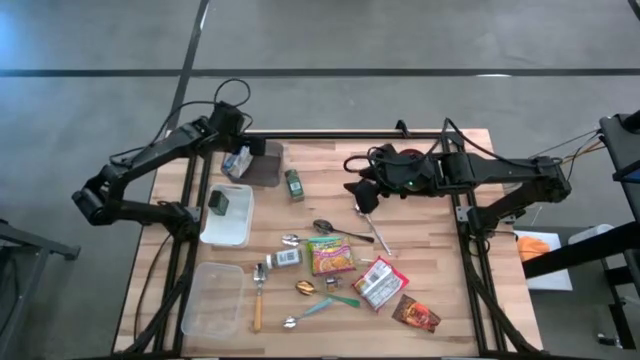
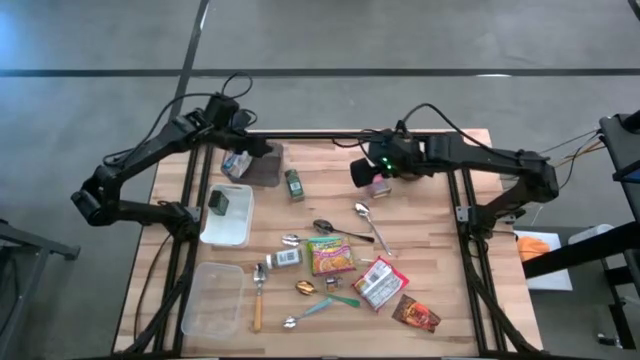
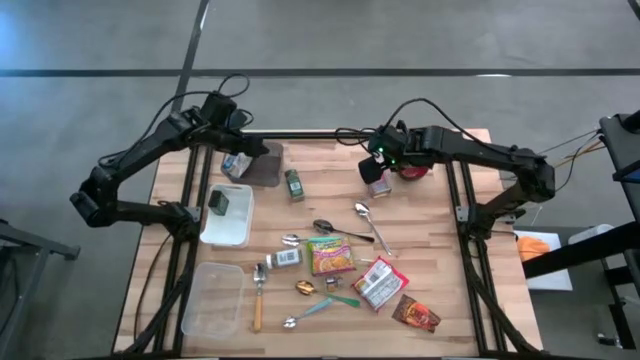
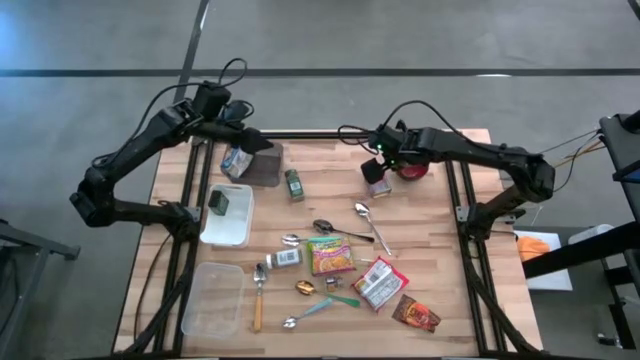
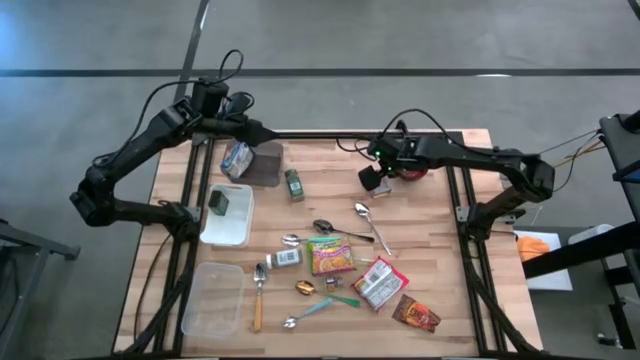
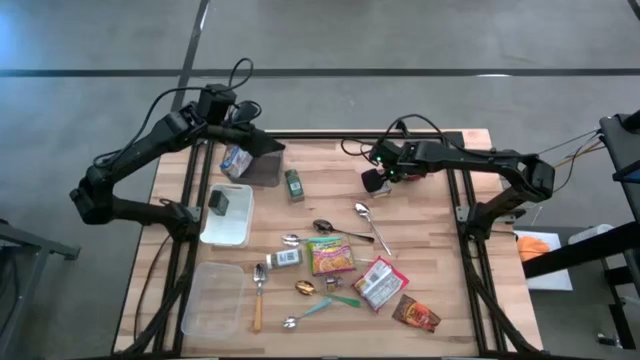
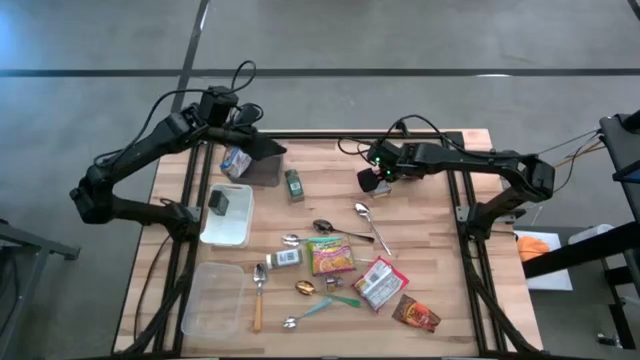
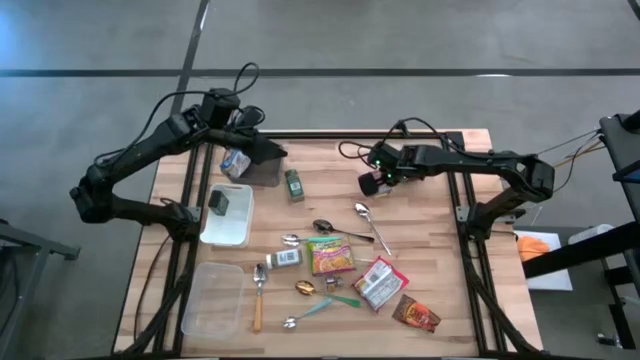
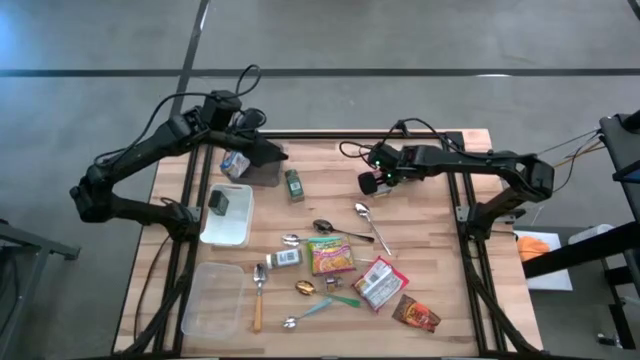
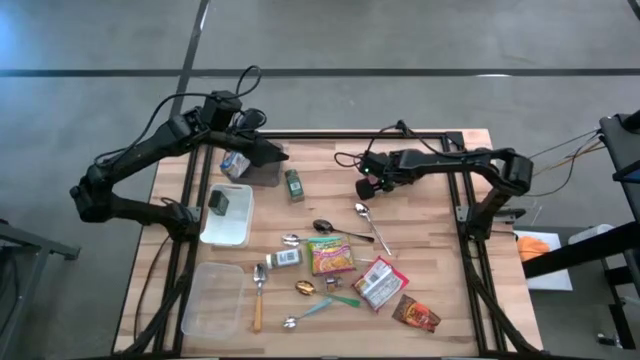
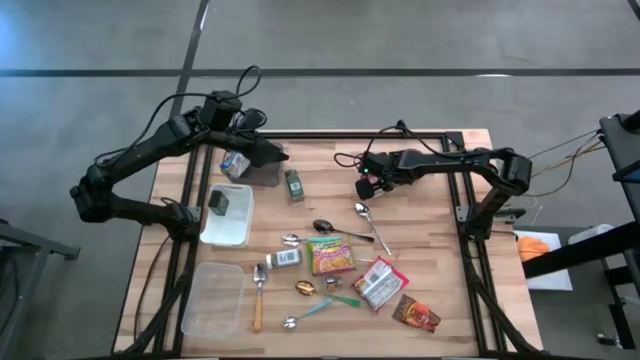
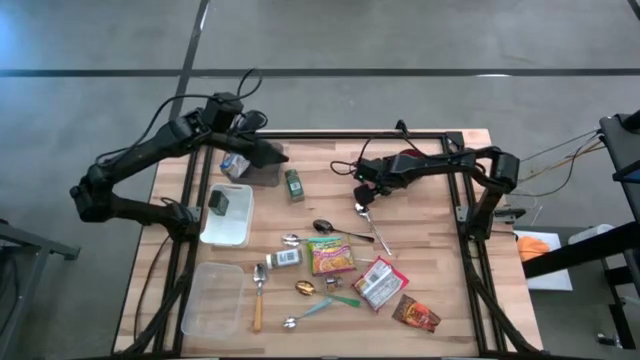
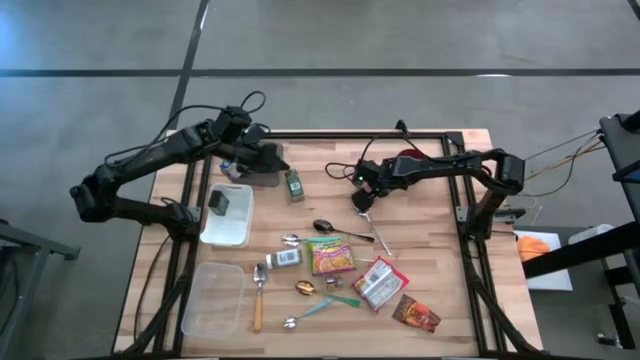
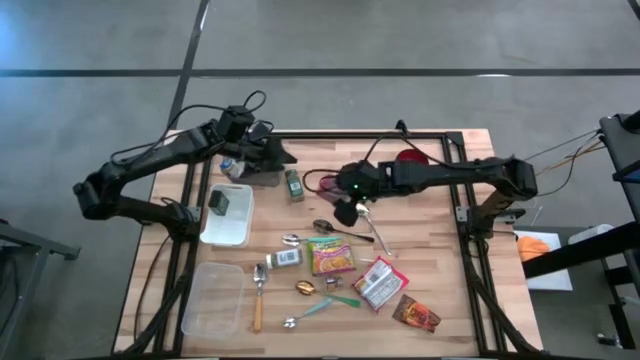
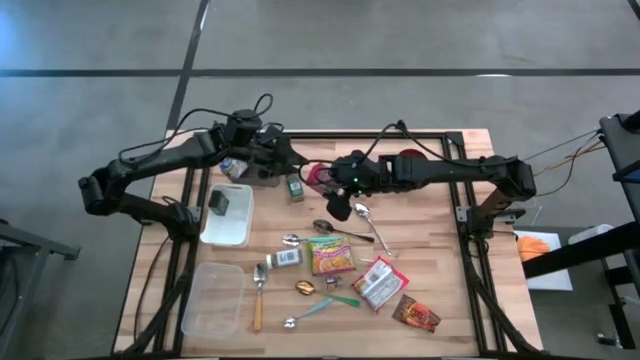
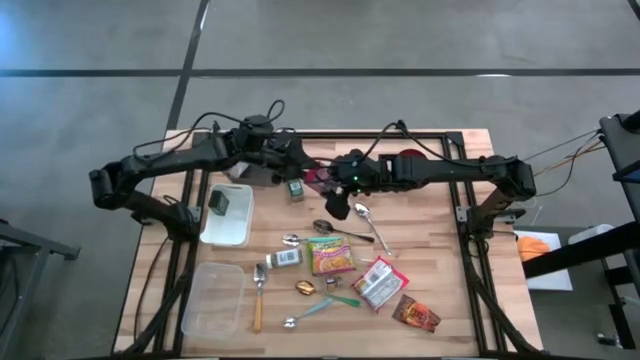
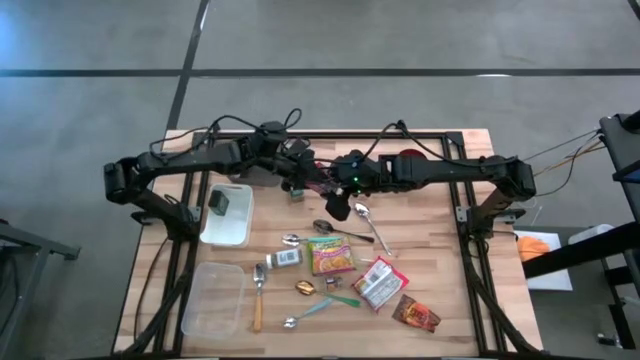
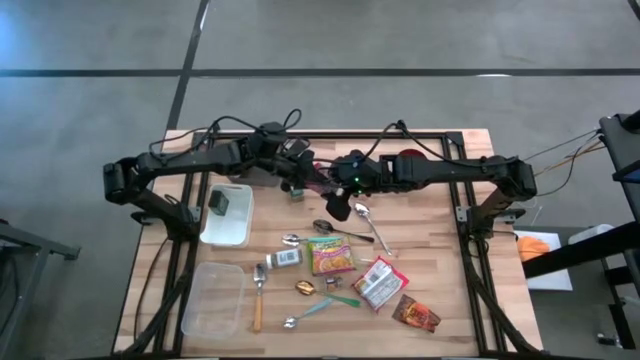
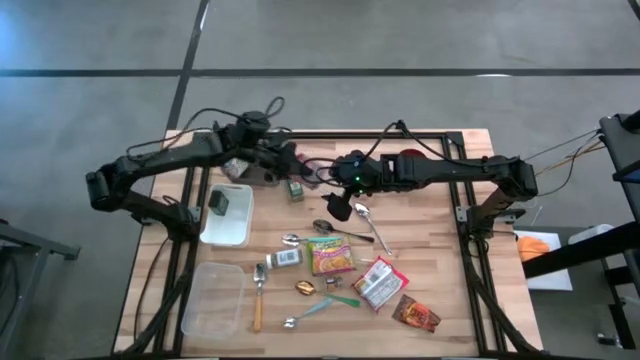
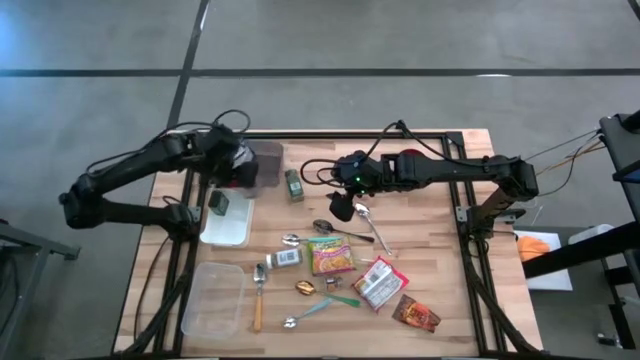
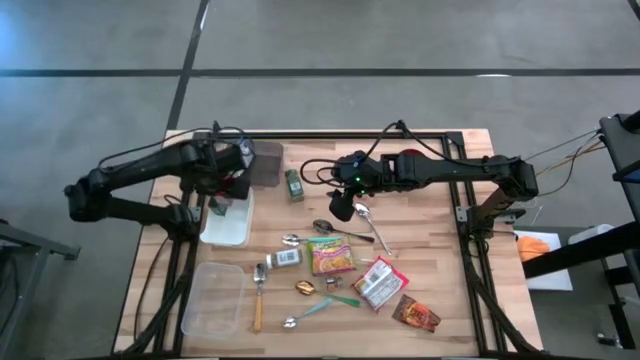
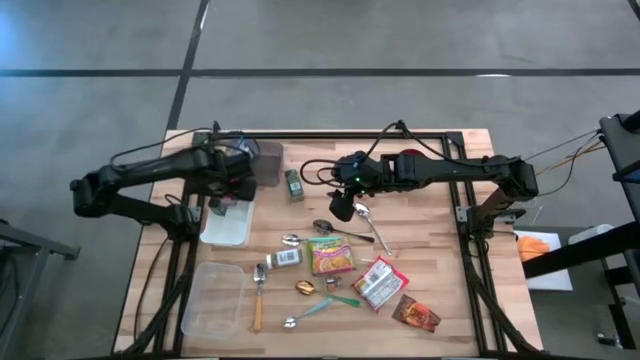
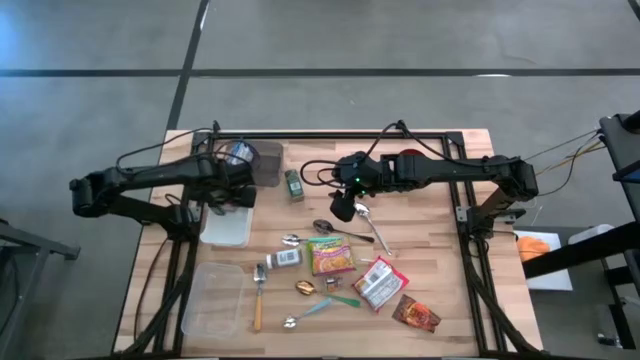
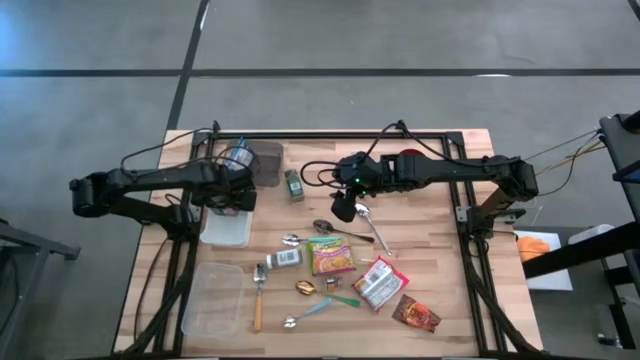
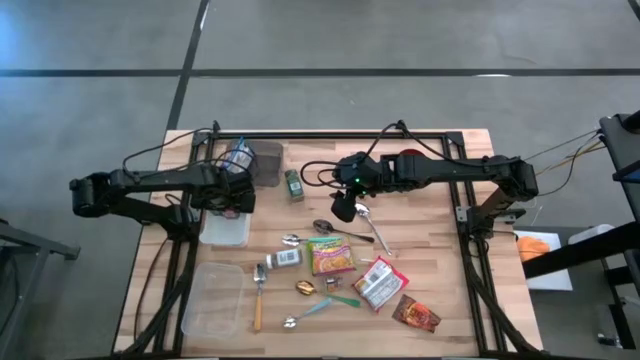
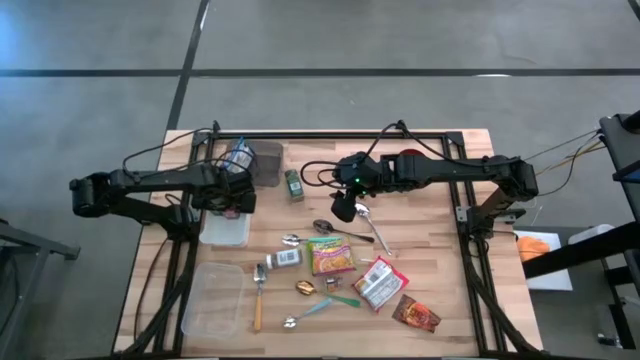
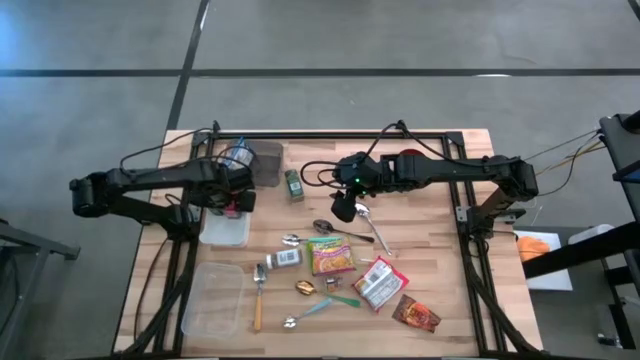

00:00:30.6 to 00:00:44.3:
Put the red seasoning can into the white bin

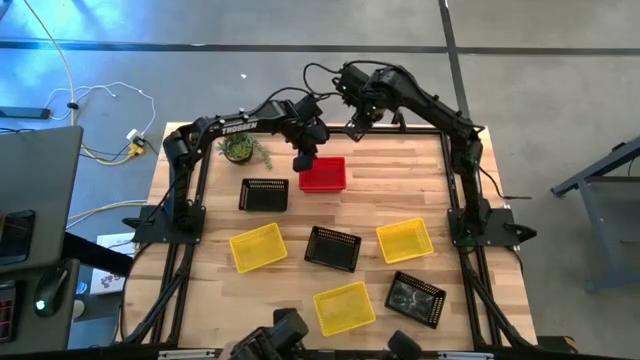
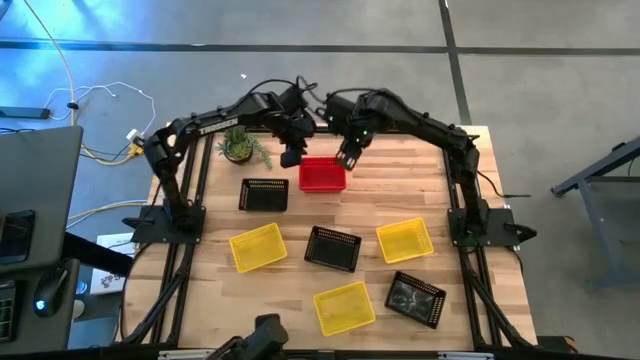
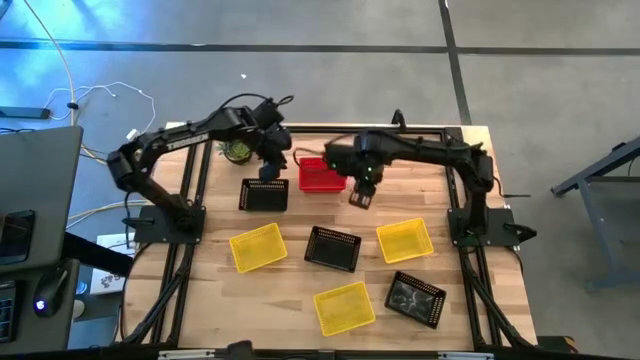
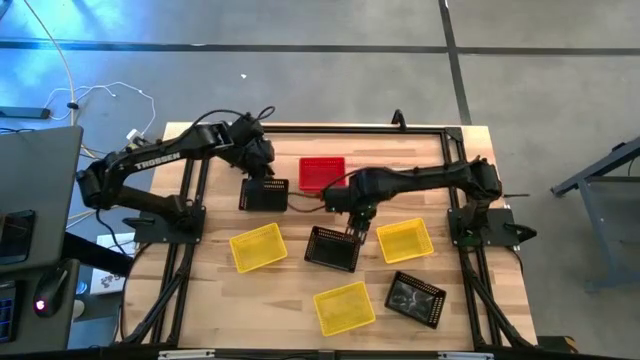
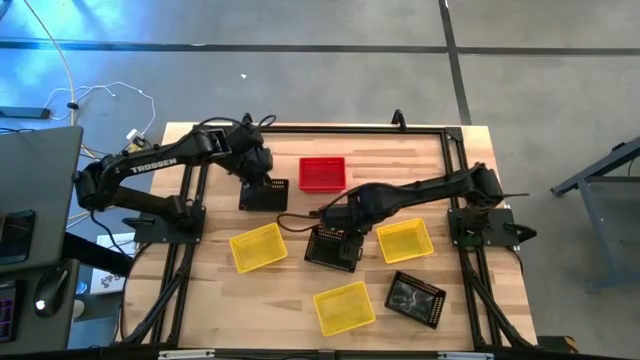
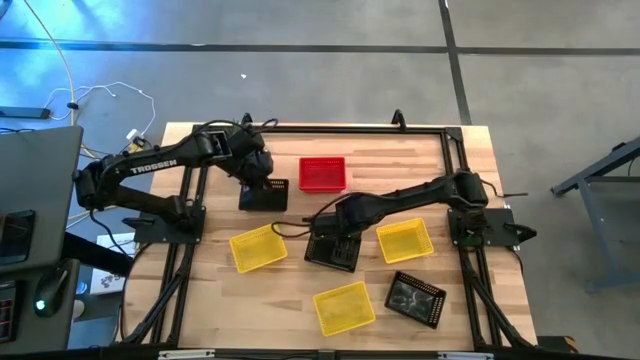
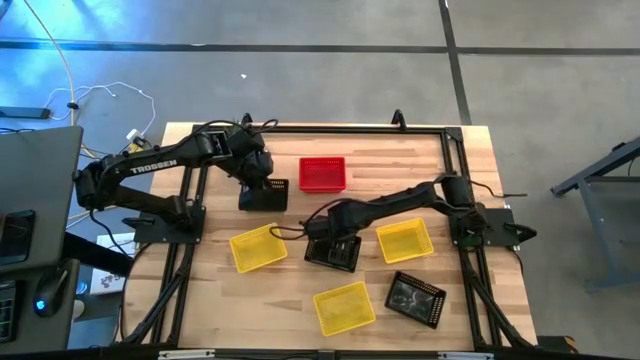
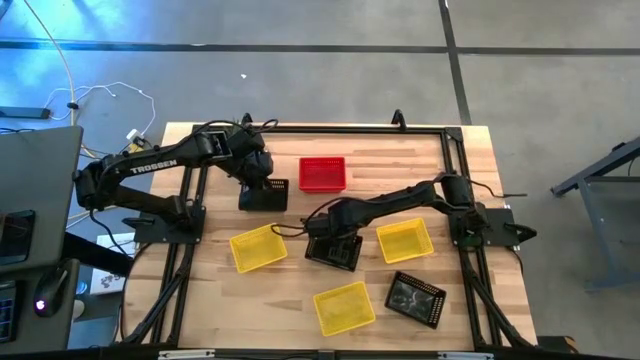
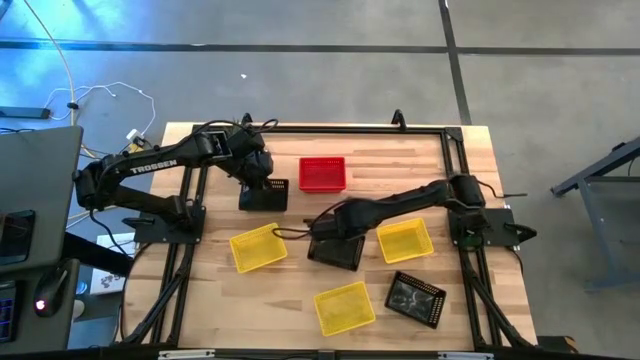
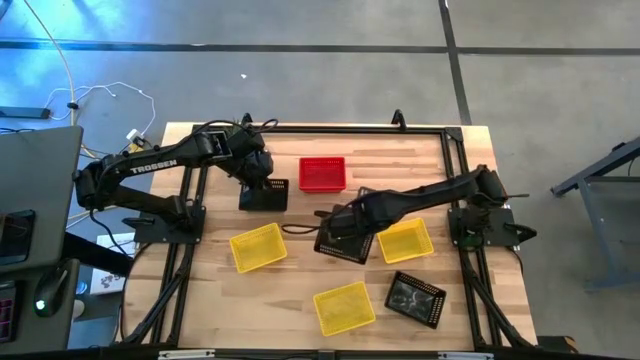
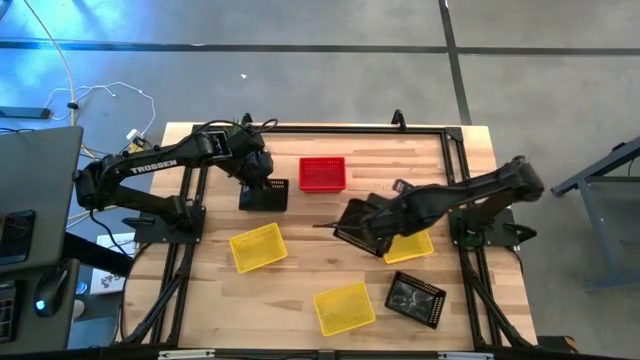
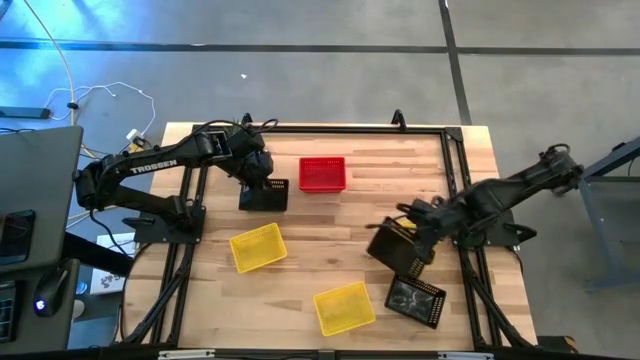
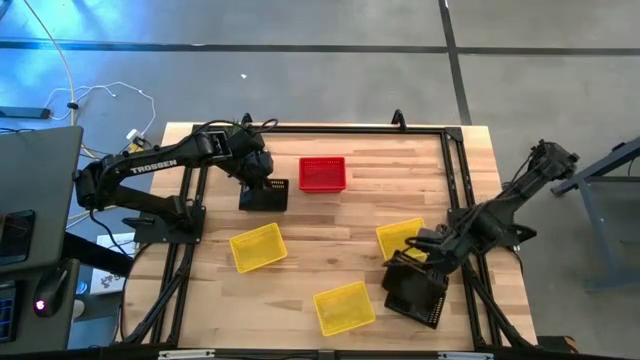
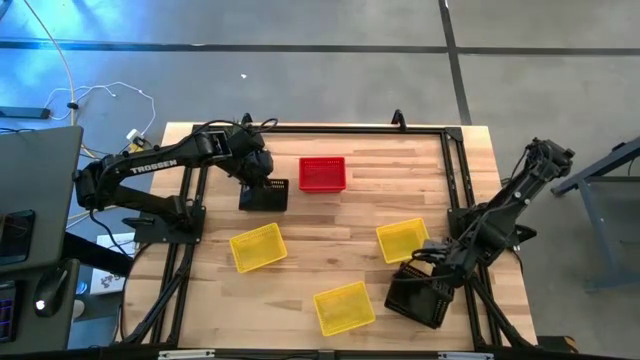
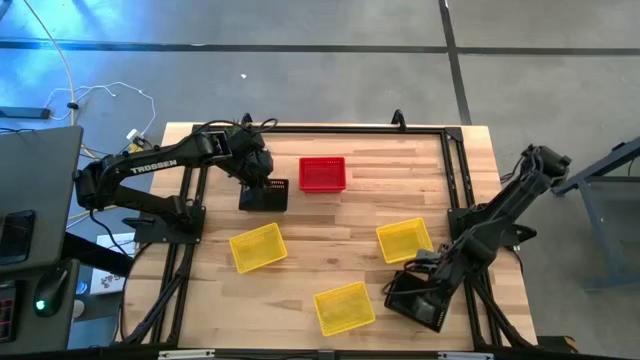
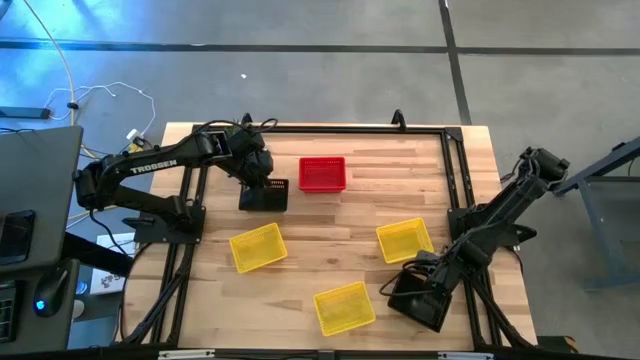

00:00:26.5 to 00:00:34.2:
Stack the middle black basket on top of the bottom black basket
